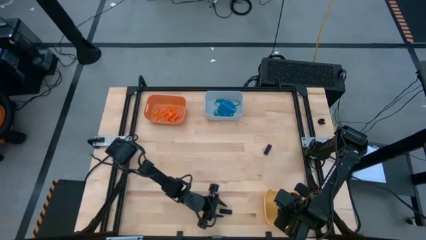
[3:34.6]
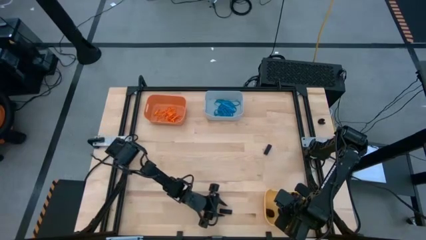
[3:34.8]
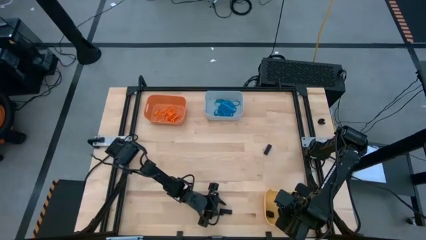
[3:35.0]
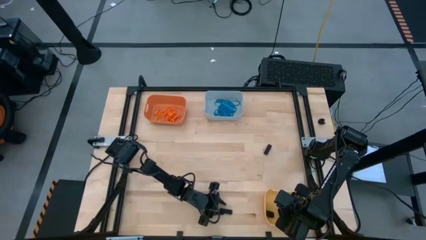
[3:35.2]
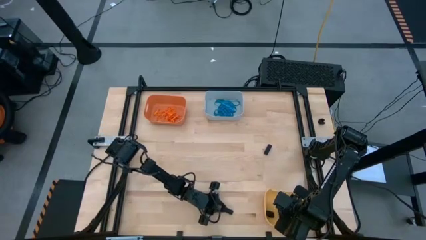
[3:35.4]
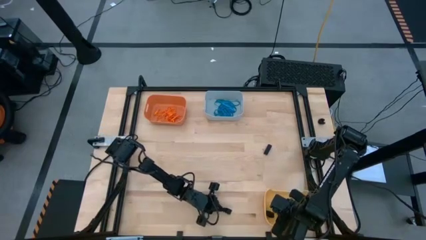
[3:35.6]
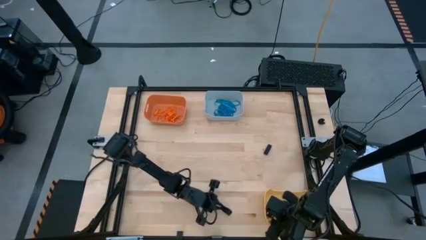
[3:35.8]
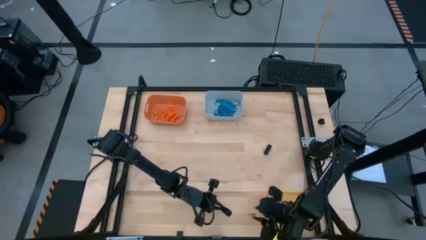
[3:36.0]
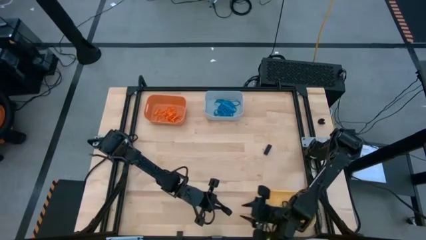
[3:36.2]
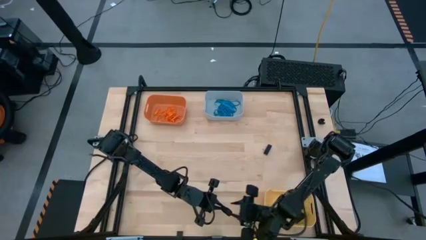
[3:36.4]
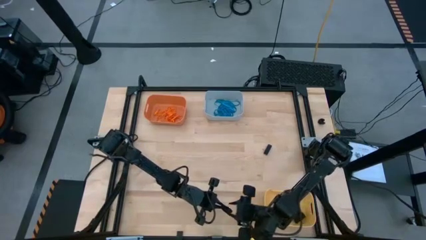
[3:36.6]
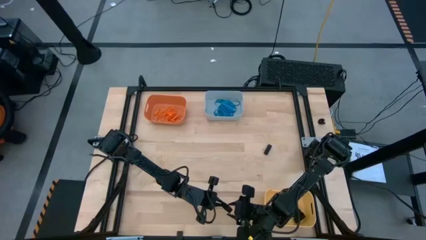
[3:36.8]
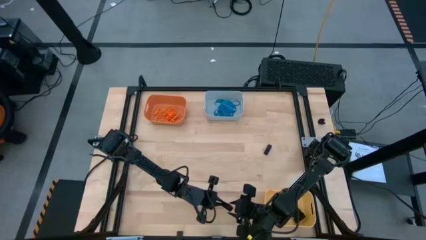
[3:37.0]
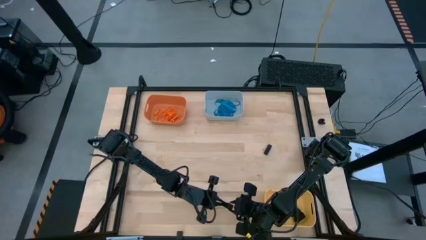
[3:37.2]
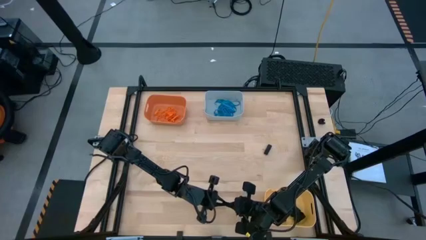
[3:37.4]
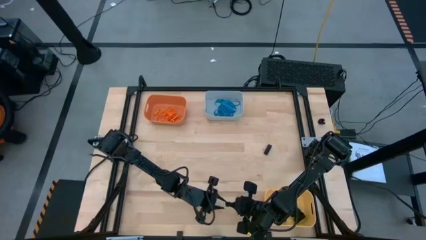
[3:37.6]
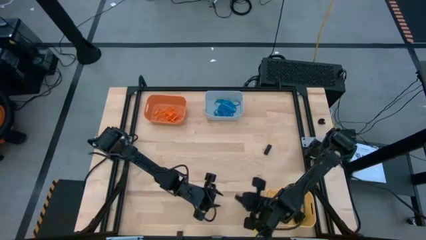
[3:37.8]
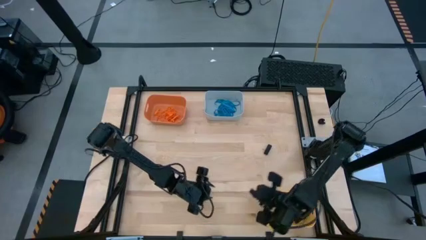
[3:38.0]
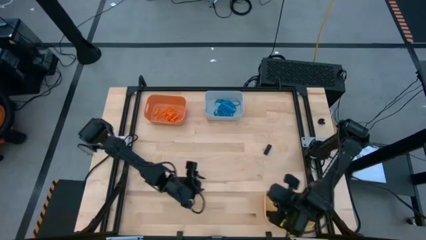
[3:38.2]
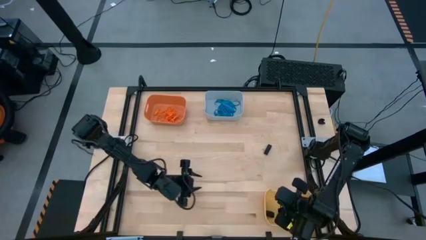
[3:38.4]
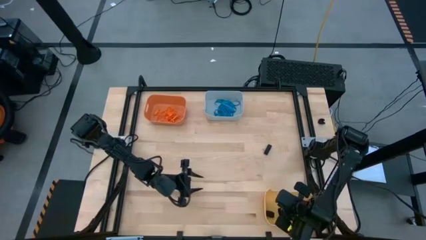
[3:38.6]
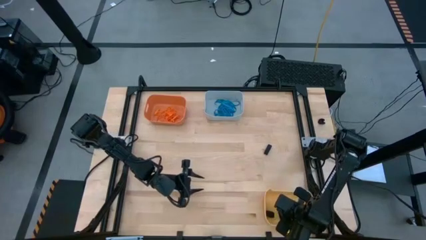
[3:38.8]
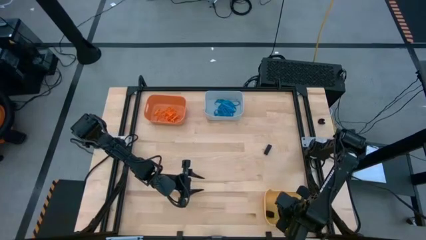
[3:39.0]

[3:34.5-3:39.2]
Task: Sort rubber bands into baskets
Put the black rubberband into the yellow bin

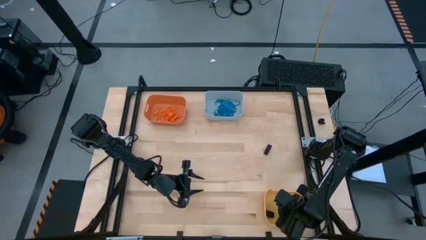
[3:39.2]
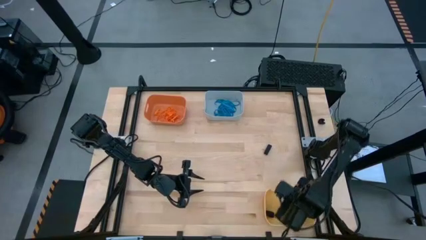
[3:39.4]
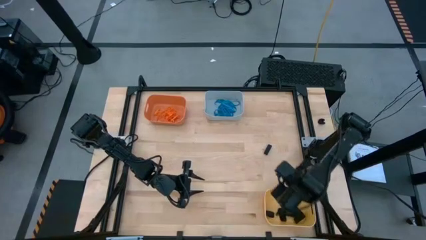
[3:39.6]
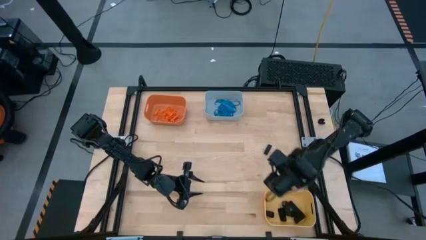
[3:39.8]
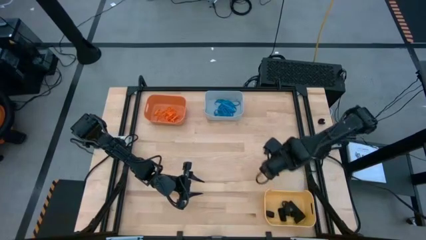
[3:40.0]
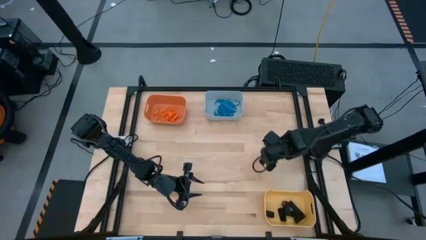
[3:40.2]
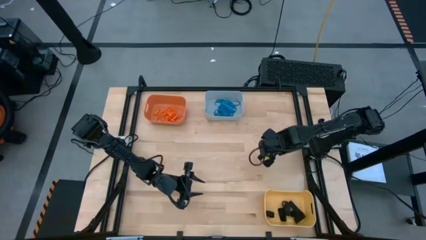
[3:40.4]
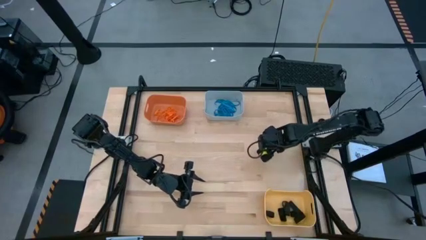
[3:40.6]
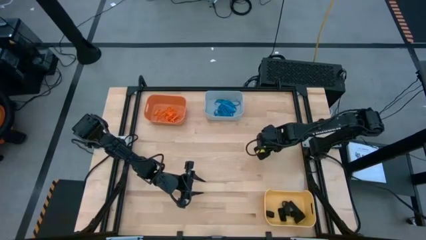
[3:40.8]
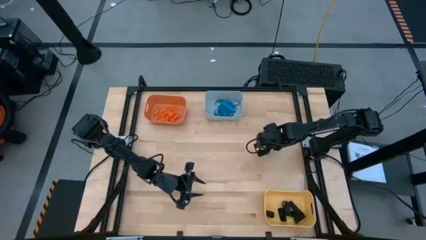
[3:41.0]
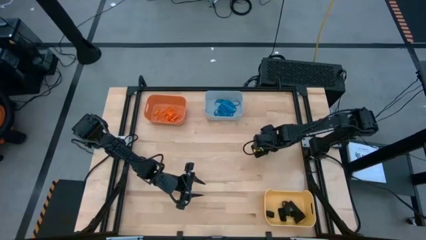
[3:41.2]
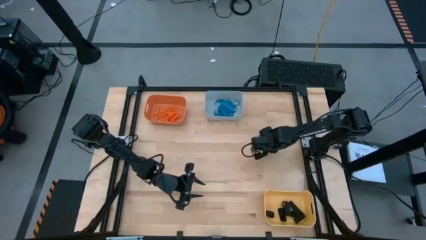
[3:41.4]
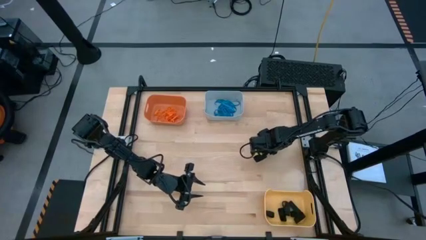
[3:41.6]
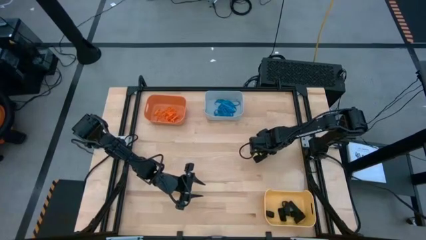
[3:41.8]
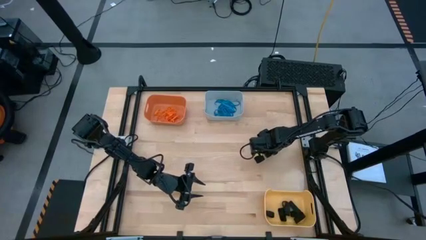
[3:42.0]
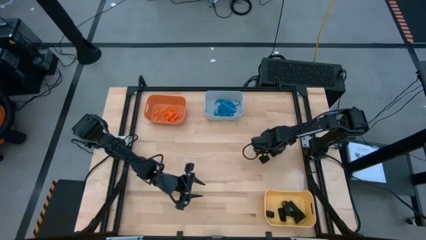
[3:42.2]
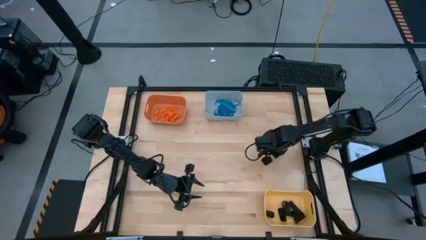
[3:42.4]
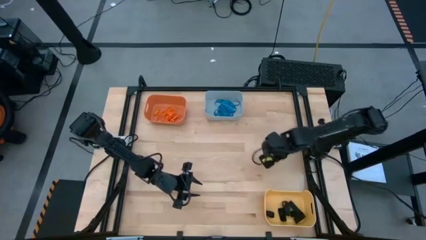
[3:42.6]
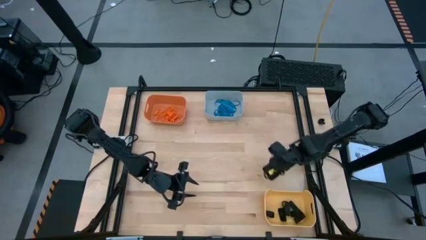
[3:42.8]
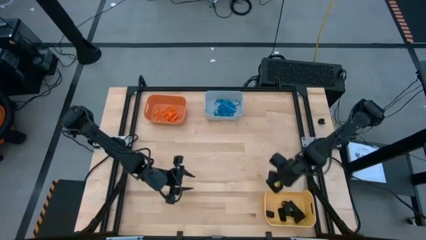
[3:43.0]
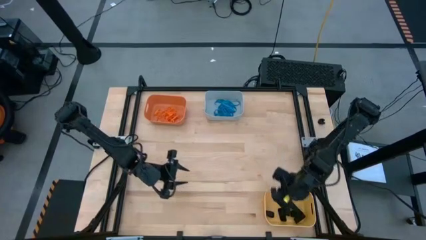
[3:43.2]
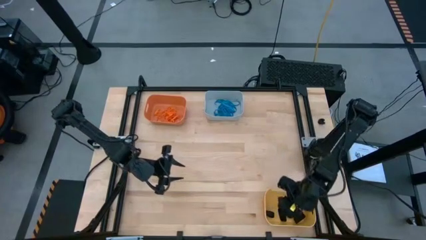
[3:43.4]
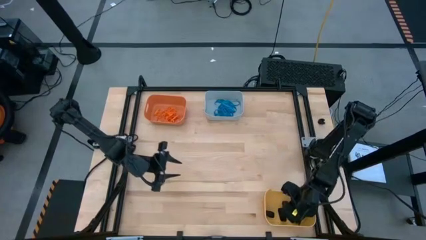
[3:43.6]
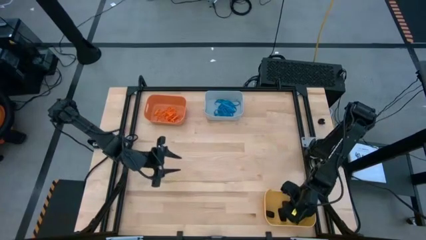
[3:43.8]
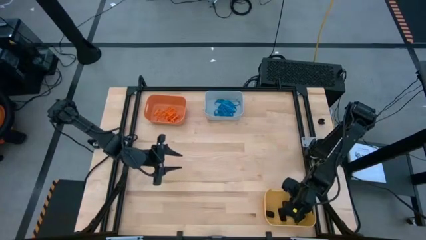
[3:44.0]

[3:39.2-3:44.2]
Put the black rubberband into the yellow bin

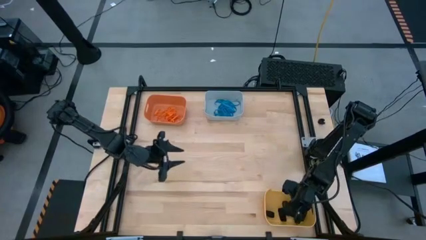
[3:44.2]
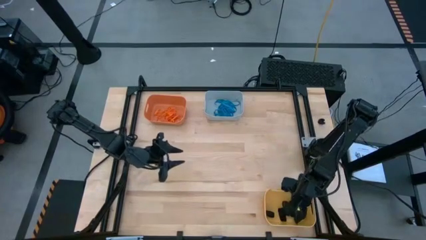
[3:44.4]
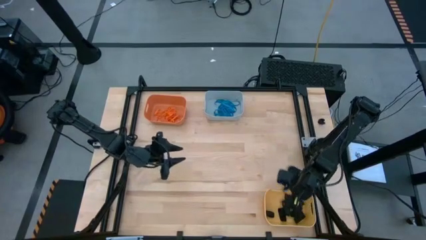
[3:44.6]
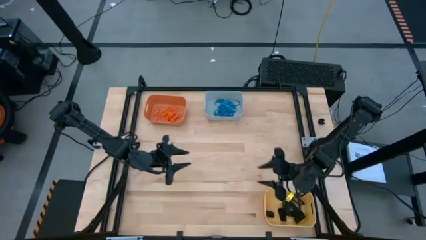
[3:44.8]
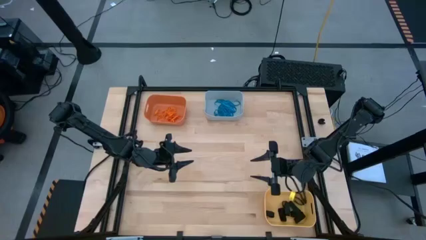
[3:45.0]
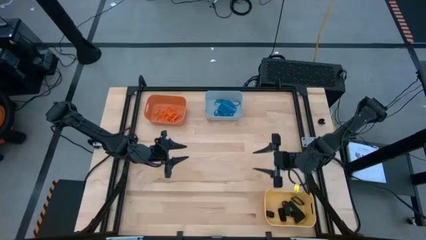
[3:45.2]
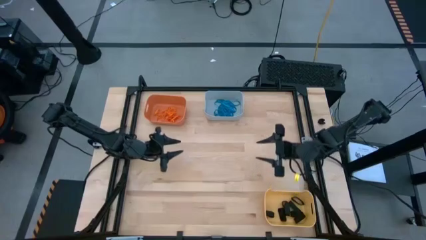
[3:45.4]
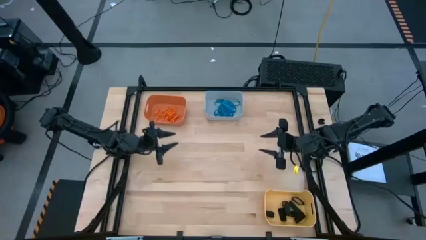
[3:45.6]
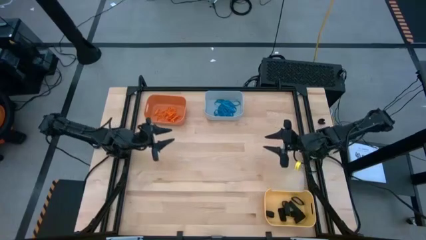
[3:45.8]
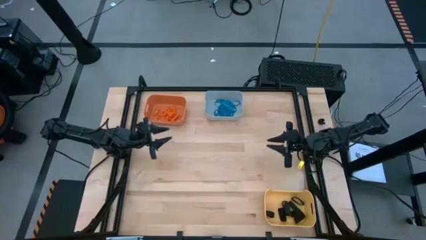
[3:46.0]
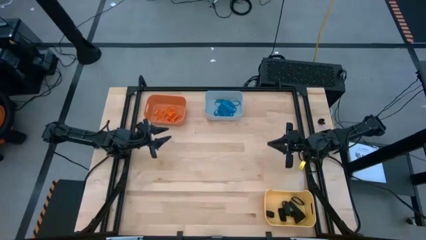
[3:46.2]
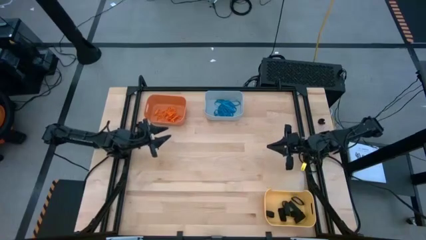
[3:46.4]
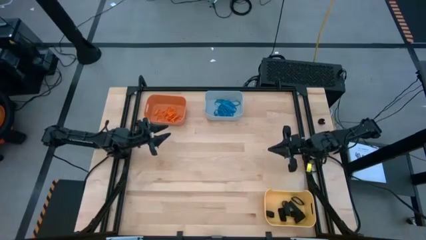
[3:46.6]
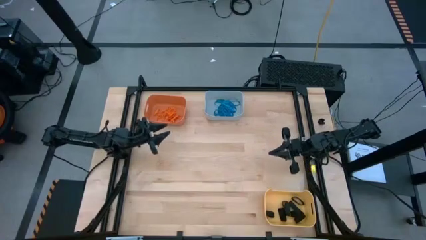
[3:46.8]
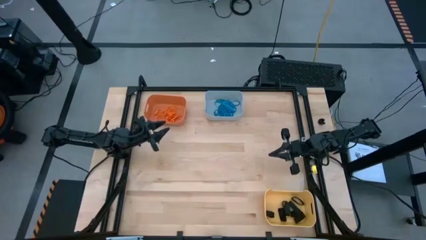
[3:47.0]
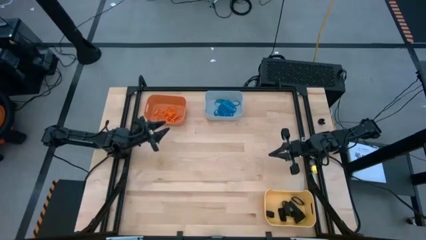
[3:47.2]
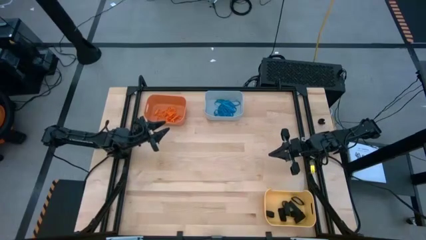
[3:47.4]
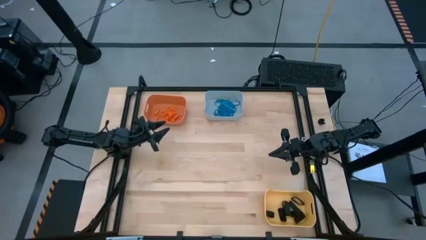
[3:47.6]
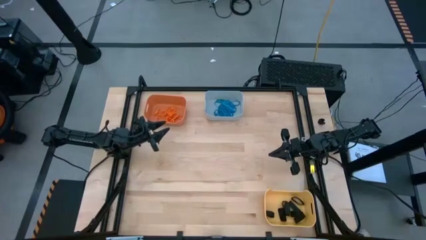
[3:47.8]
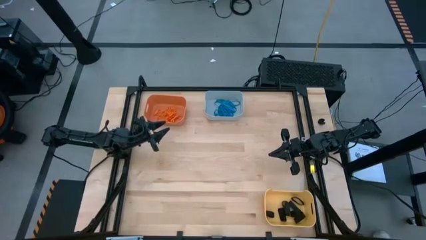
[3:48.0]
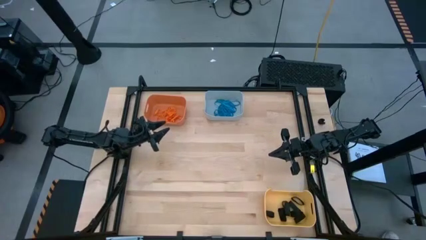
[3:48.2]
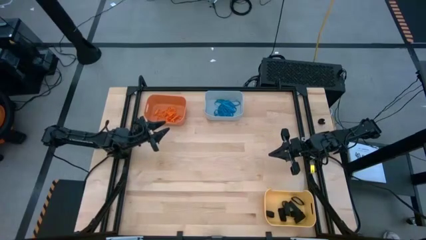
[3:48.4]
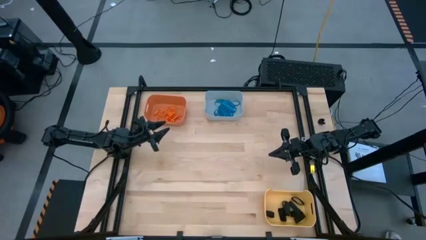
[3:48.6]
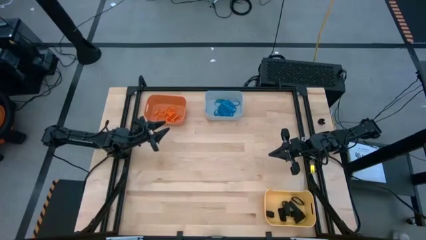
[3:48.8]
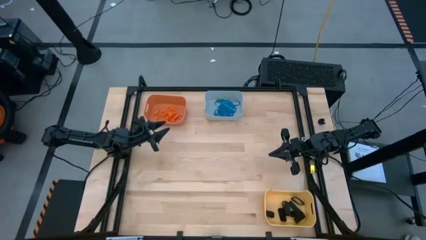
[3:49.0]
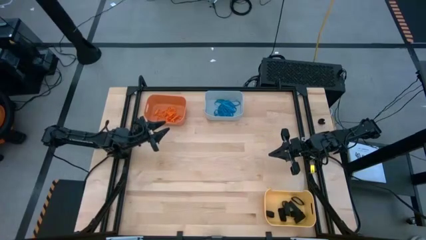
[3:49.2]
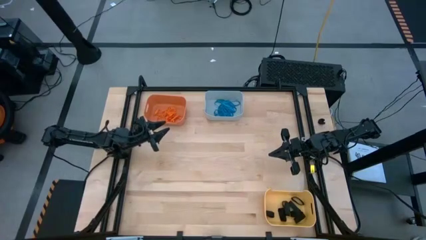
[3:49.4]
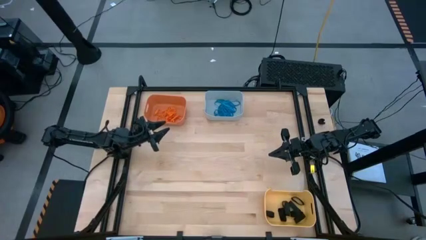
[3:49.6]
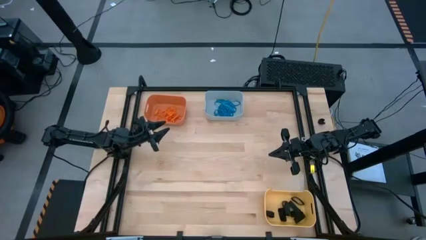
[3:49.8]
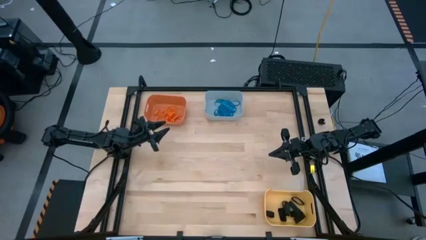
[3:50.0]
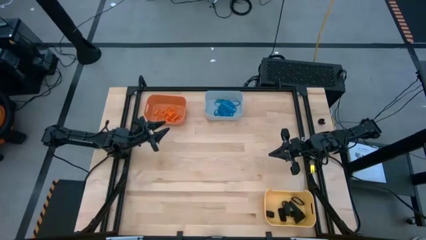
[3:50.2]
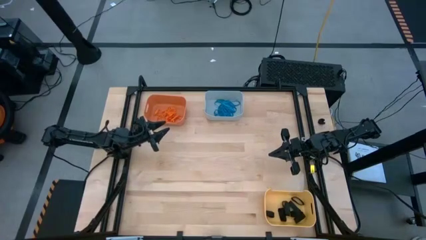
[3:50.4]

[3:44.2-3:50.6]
Return to Home Position
